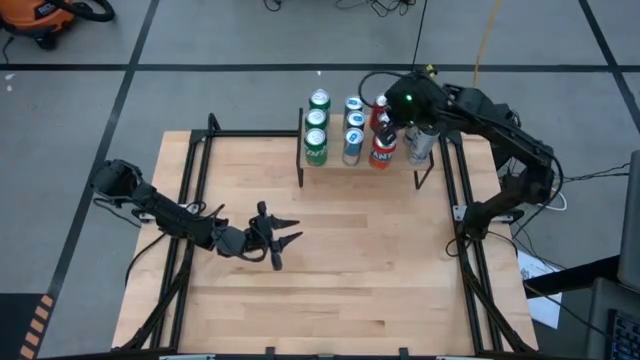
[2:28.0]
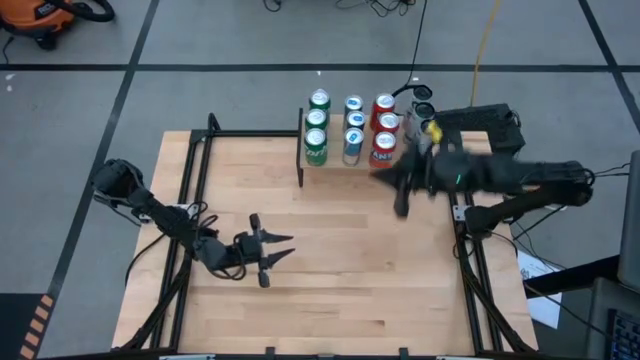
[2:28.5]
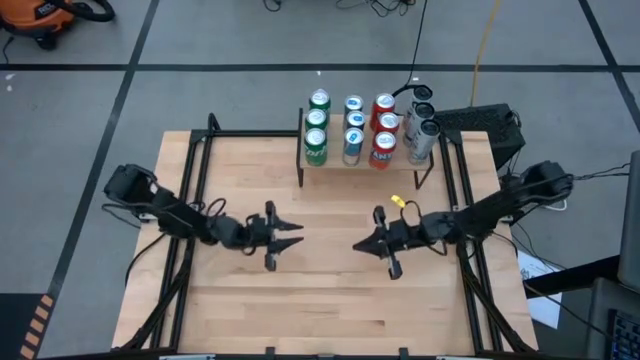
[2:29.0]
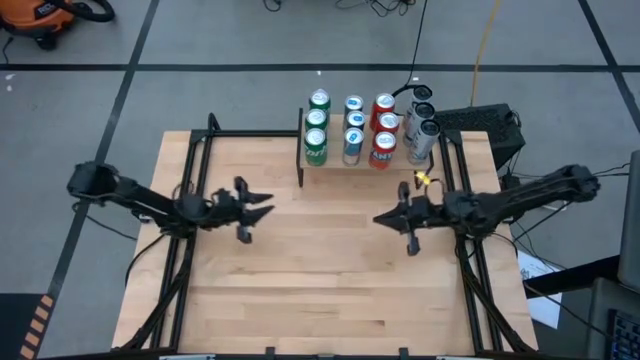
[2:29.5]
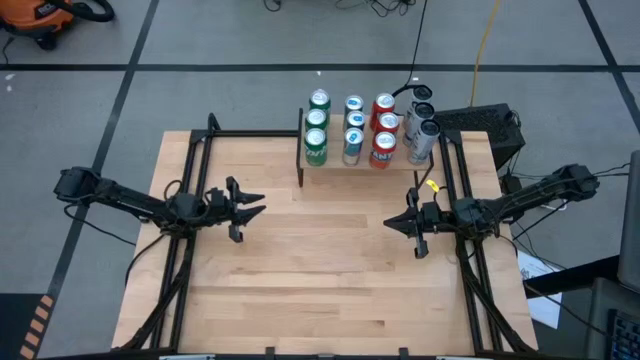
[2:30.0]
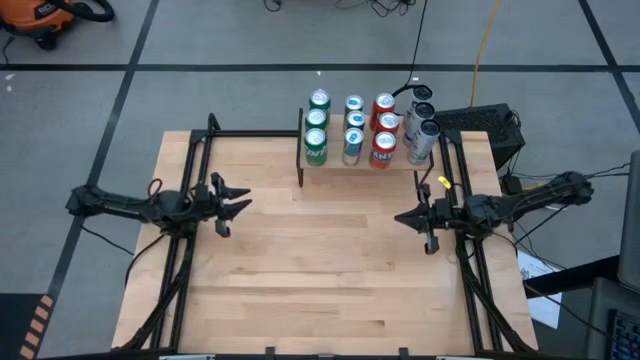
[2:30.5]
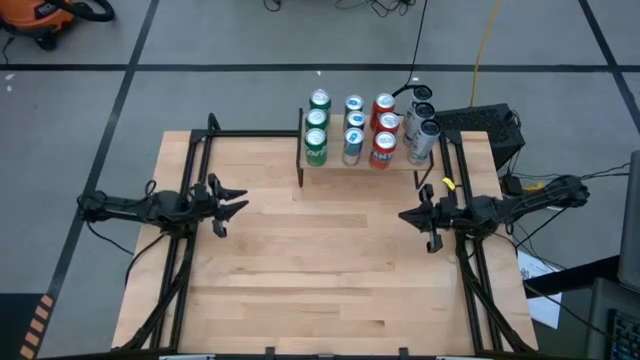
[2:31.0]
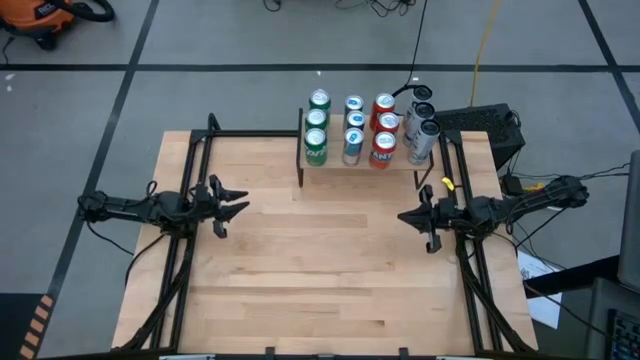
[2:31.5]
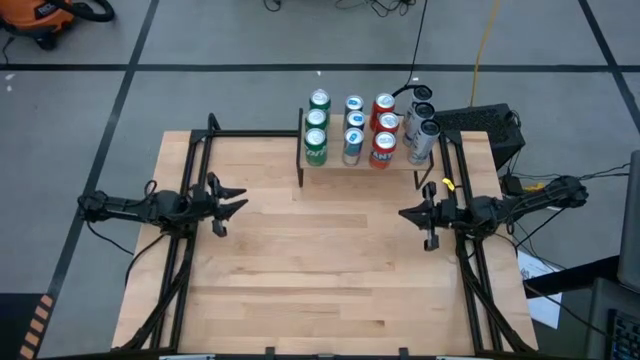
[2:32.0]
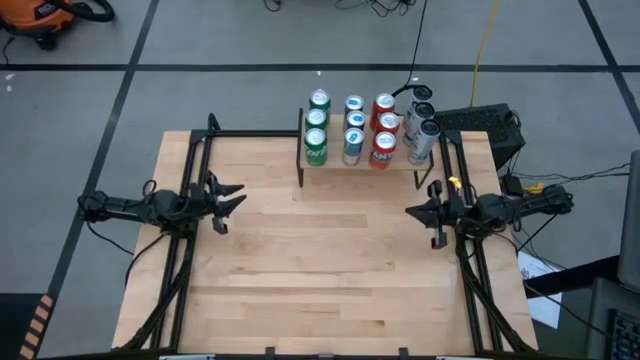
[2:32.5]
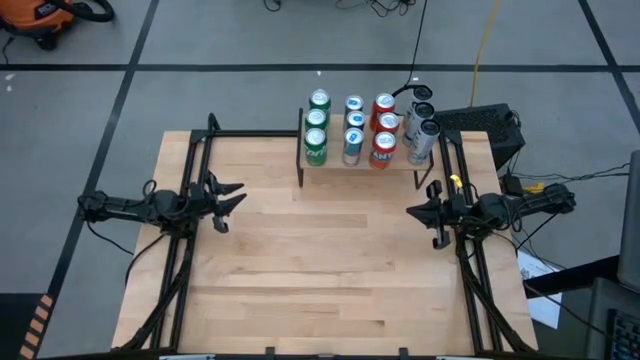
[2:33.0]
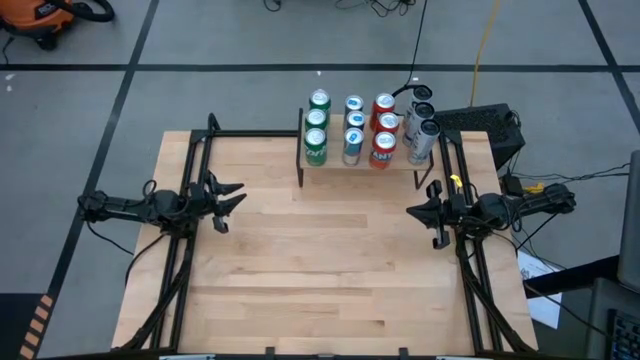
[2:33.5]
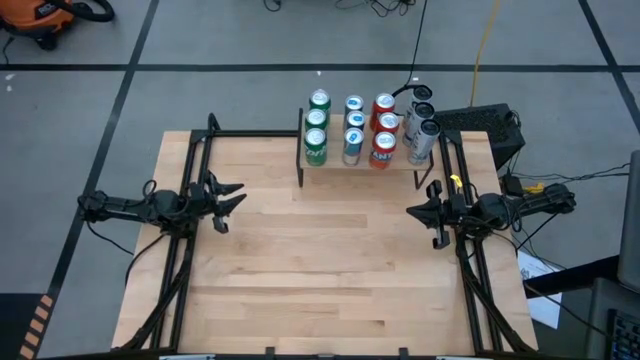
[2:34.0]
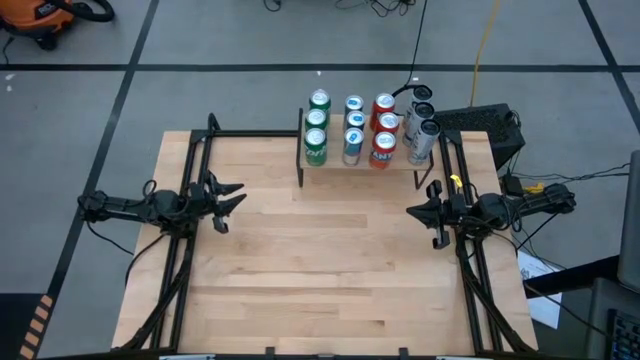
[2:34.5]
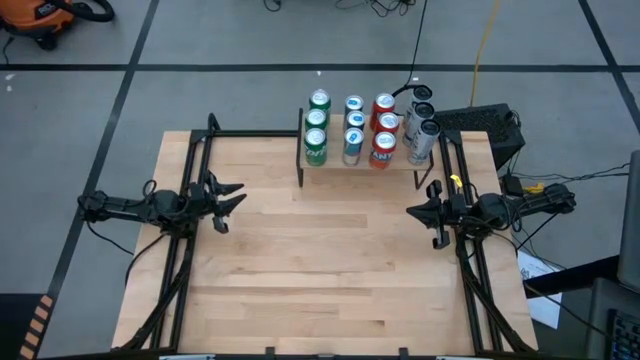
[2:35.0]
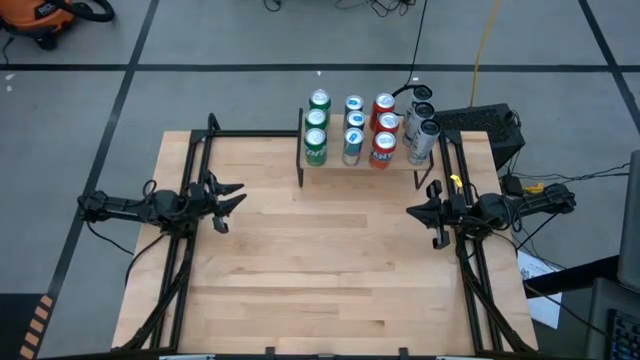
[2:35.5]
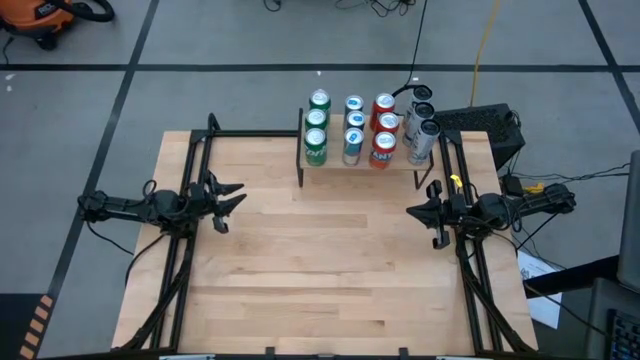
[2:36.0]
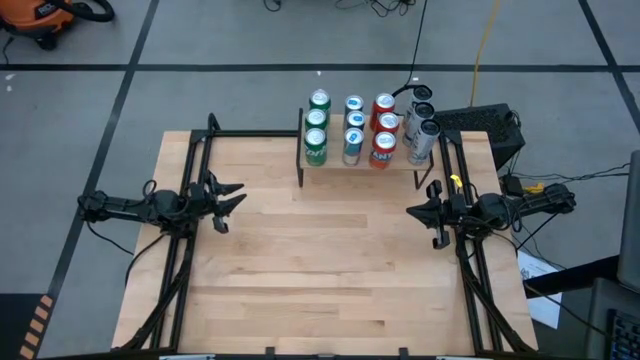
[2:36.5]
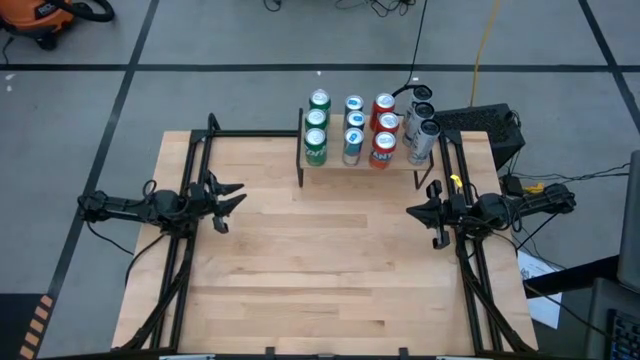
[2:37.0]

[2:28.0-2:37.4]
Task: Place canned beverage on shelf
Return to Home Position

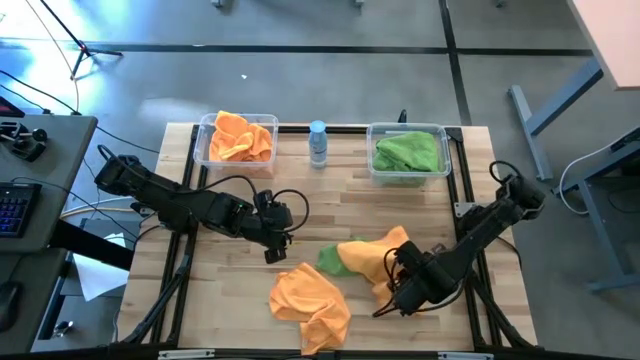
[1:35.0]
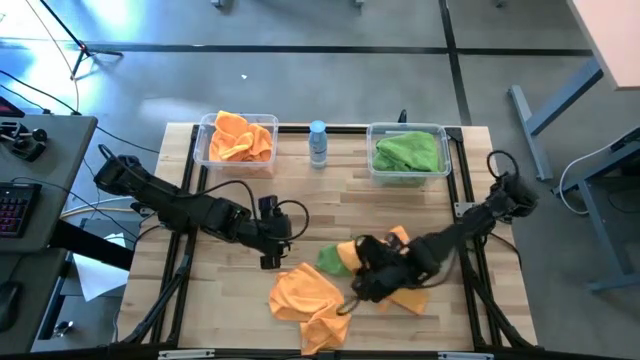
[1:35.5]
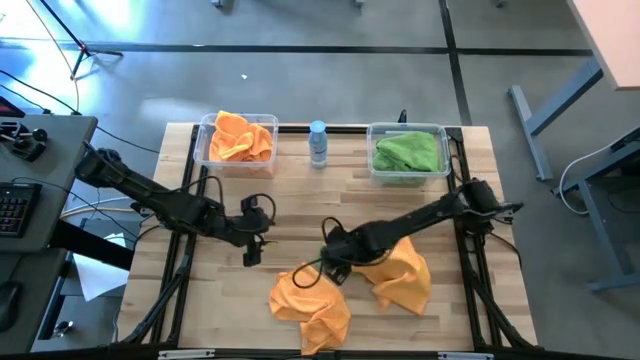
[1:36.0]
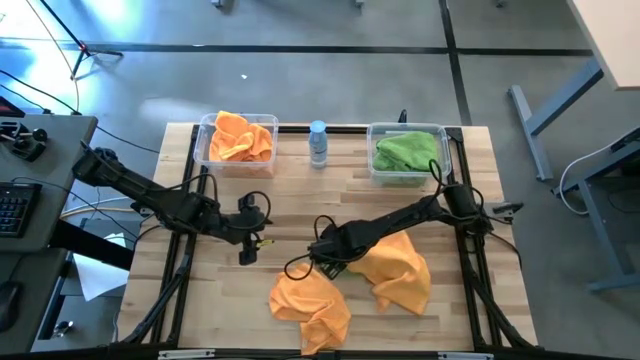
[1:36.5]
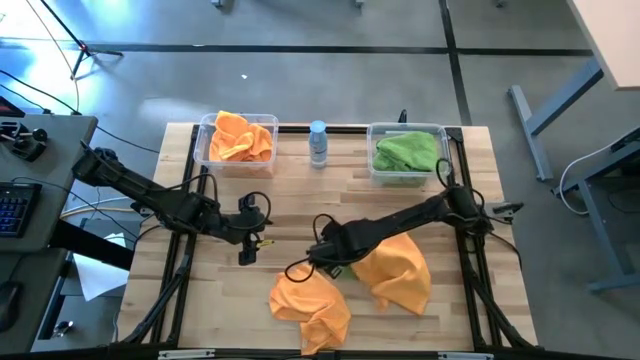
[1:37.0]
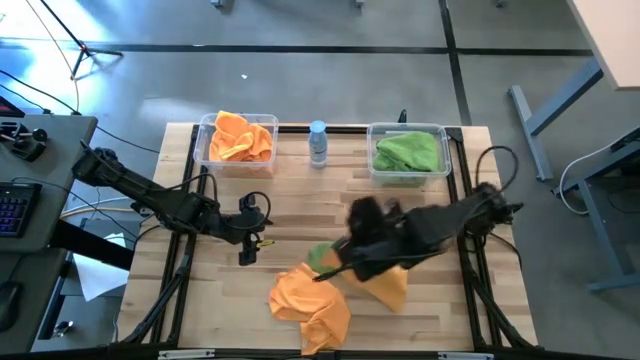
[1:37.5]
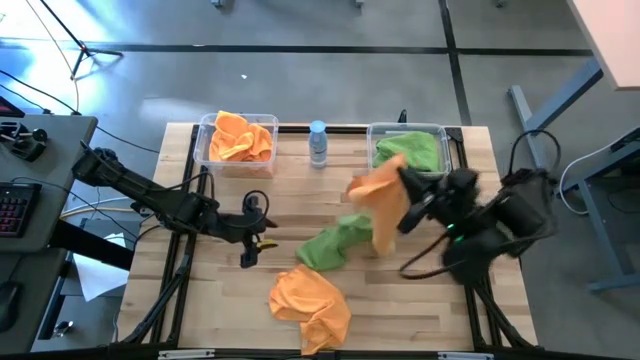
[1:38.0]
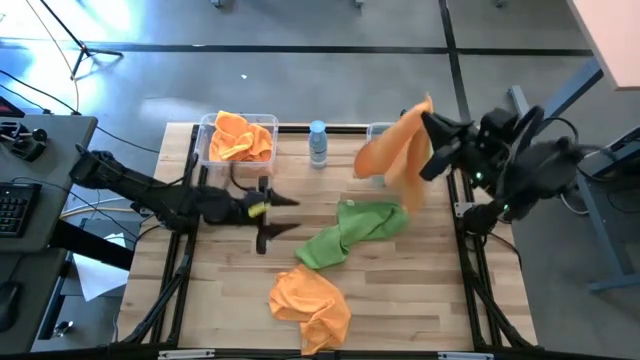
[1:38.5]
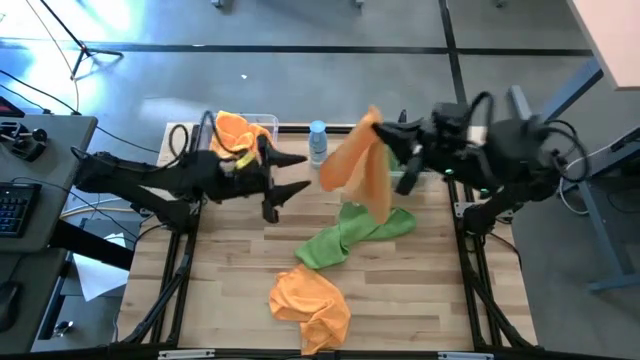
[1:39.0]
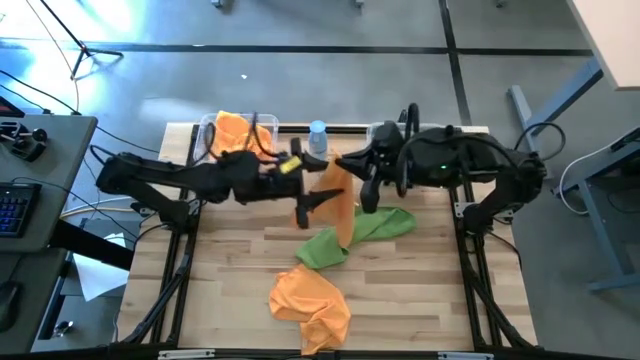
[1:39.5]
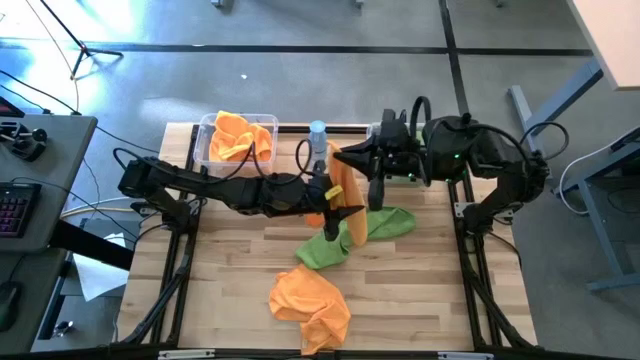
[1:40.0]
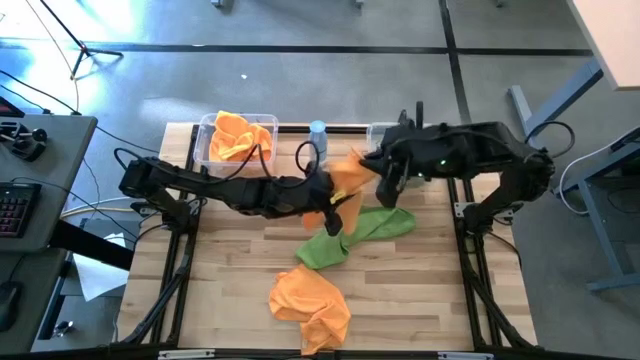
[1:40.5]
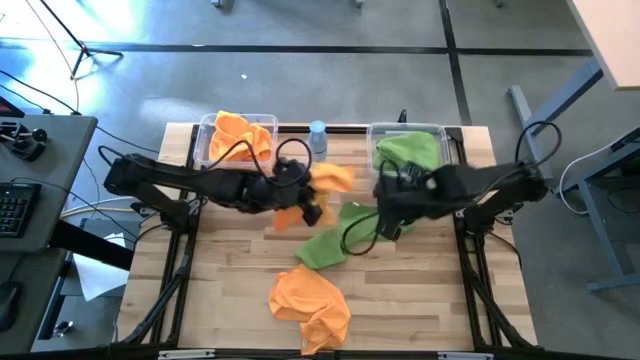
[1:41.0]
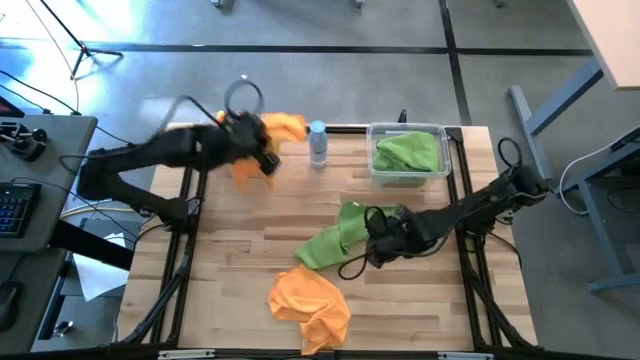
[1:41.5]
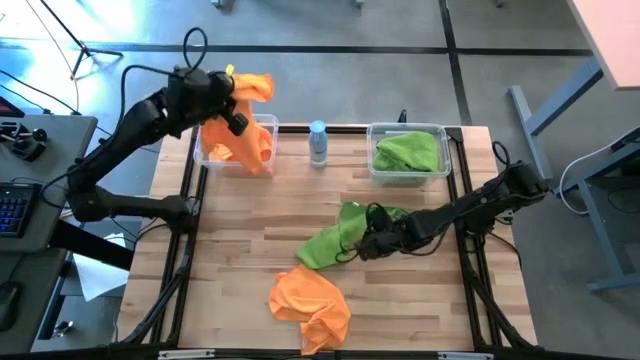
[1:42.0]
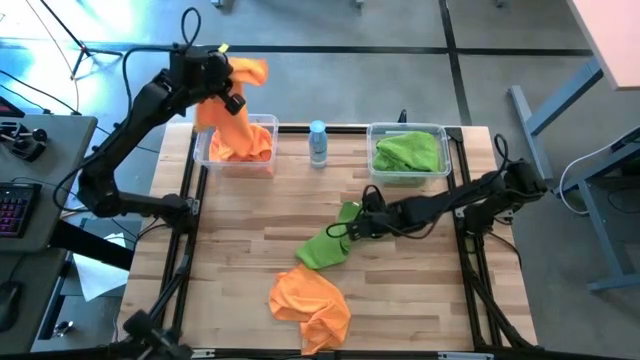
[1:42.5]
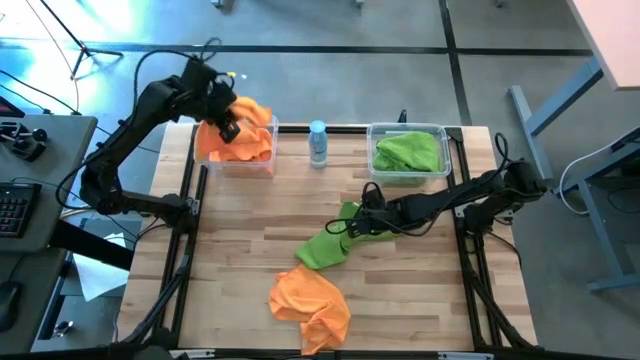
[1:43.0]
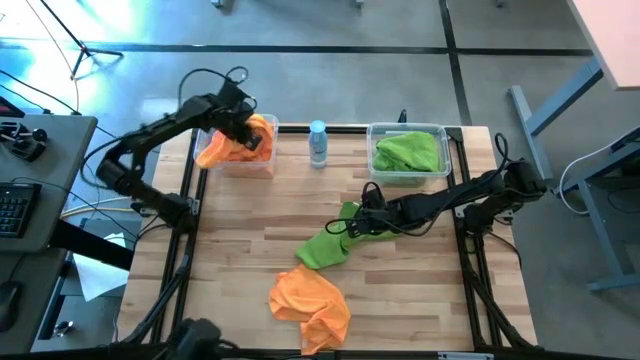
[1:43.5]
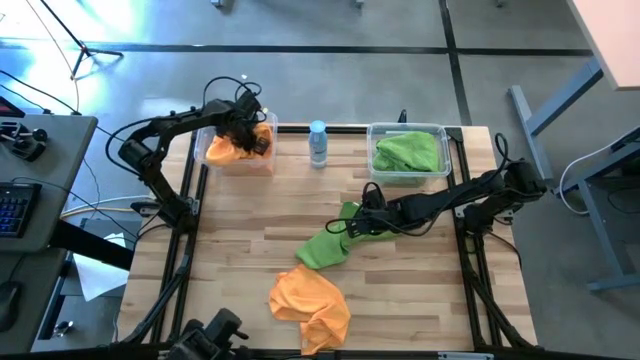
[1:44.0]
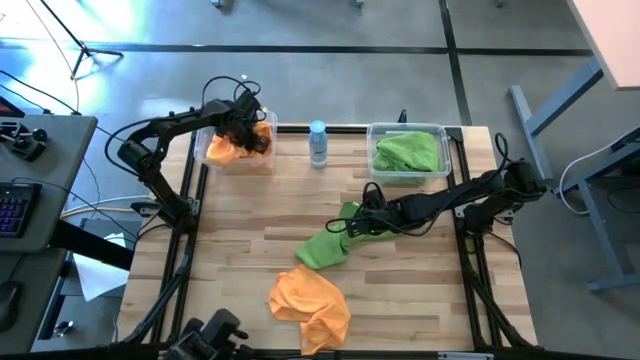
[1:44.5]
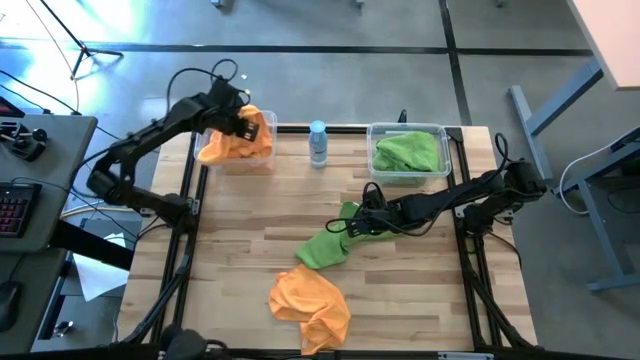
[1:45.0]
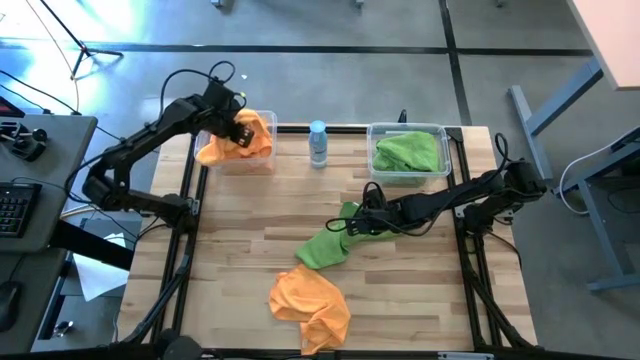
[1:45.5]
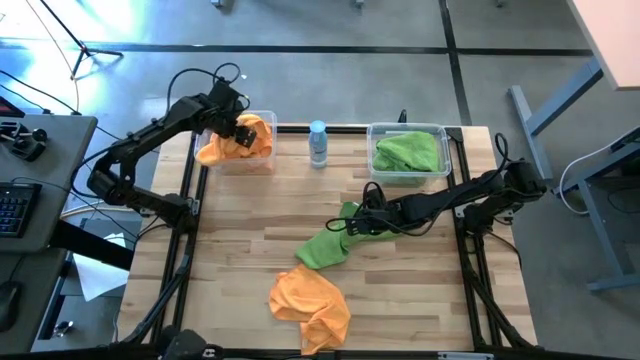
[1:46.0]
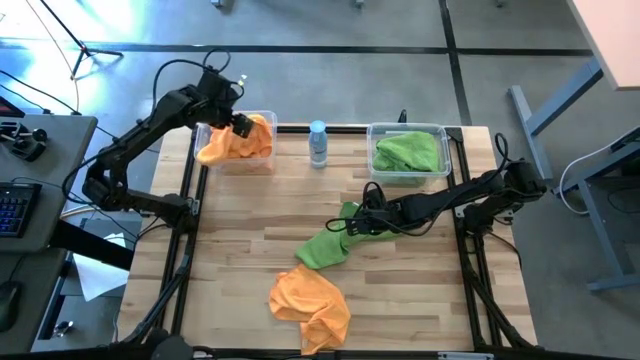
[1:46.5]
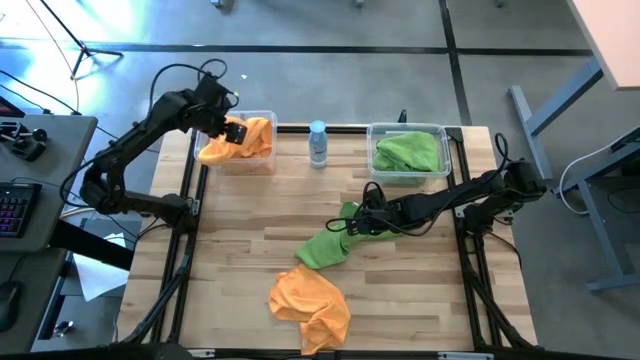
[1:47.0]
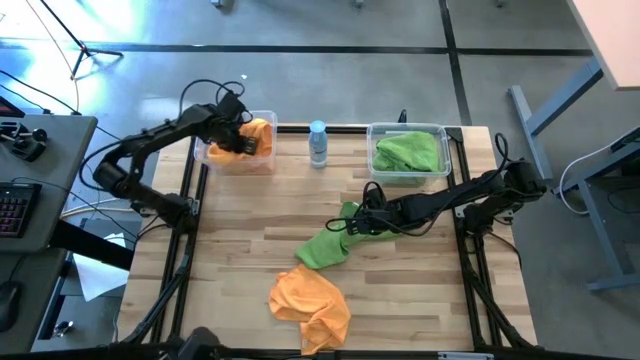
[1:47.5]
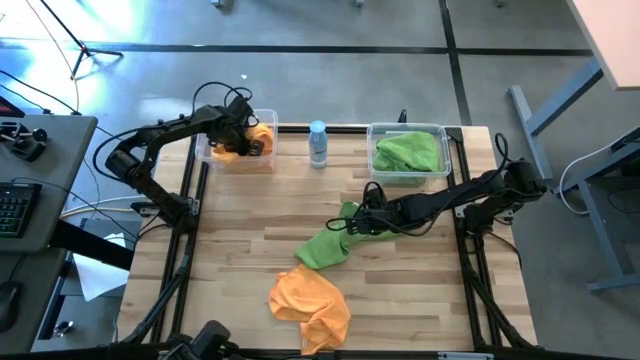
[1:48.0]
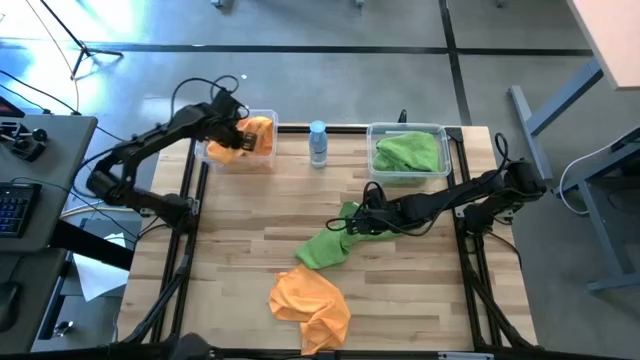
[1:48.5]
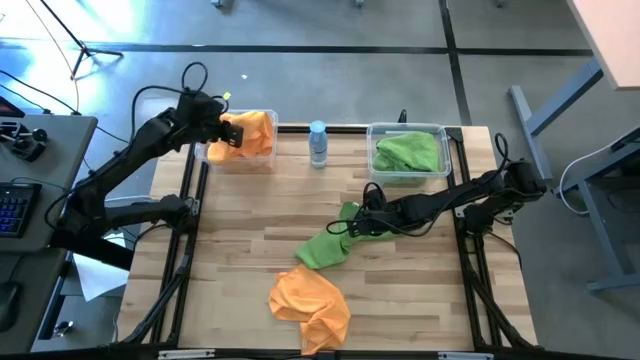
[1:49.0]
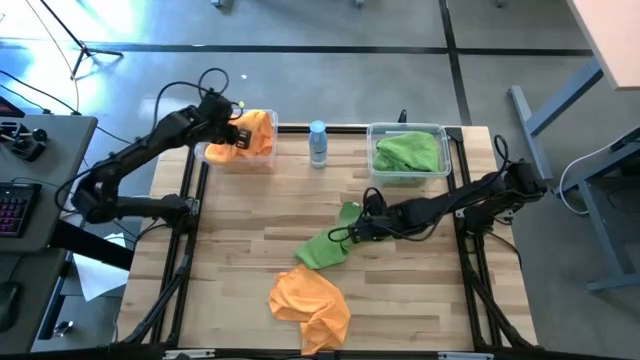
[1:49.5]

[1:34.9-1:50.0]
Task: Sort microfiber towel by color & place in baskets
Put the orange towel into the left transparent bin
